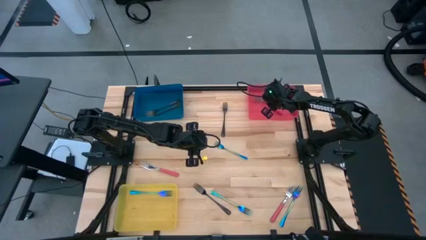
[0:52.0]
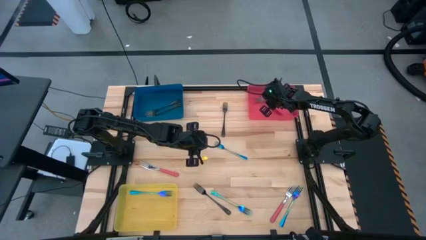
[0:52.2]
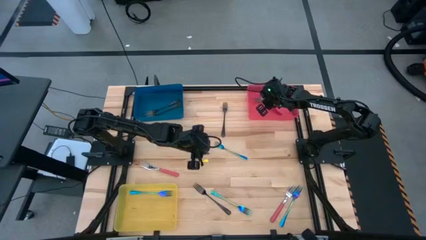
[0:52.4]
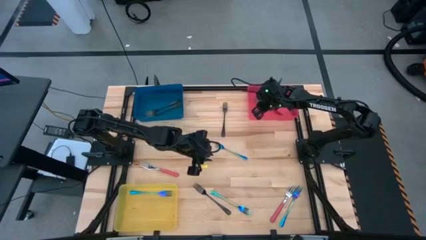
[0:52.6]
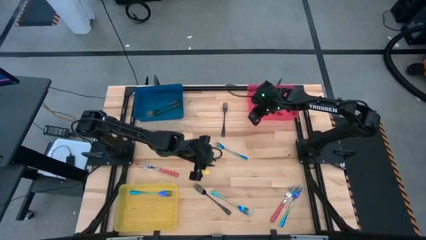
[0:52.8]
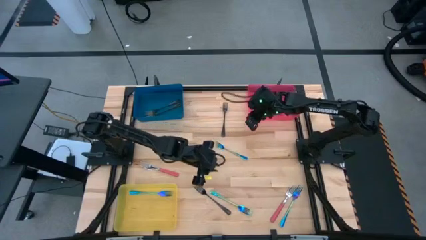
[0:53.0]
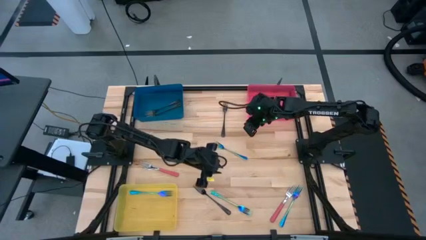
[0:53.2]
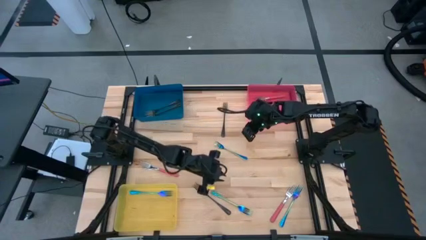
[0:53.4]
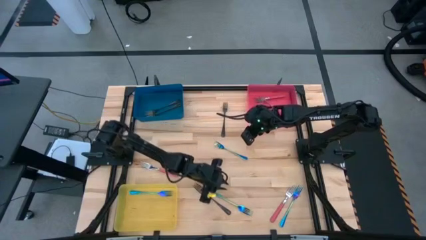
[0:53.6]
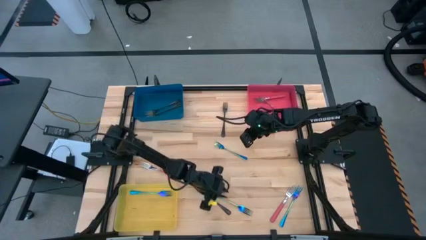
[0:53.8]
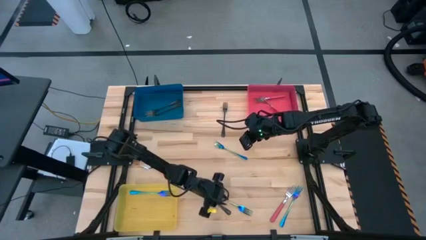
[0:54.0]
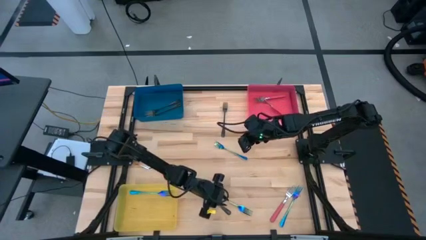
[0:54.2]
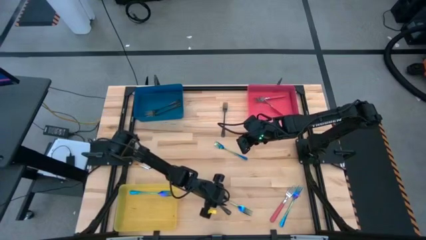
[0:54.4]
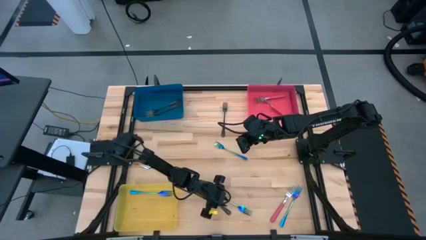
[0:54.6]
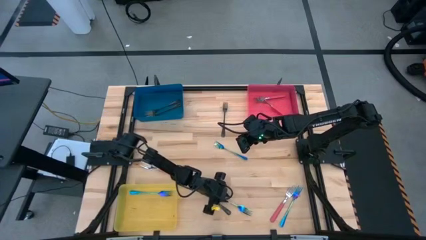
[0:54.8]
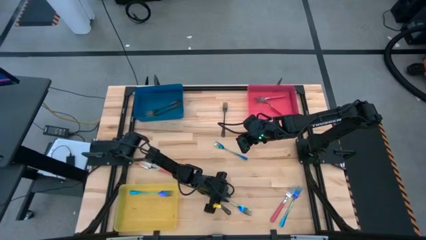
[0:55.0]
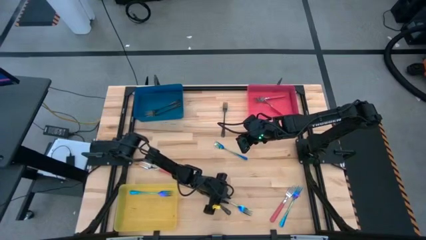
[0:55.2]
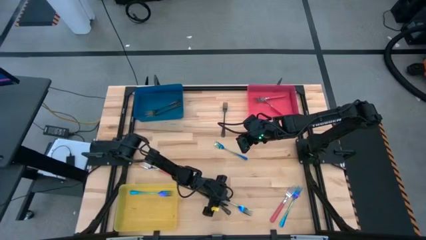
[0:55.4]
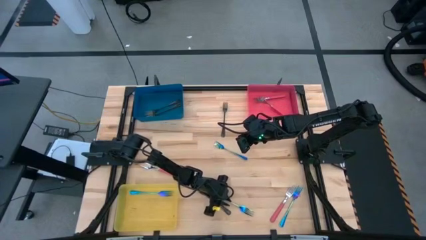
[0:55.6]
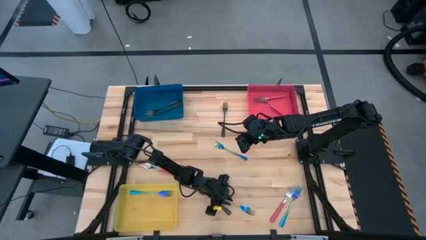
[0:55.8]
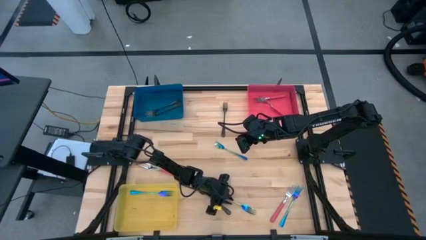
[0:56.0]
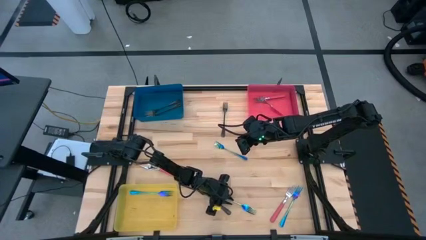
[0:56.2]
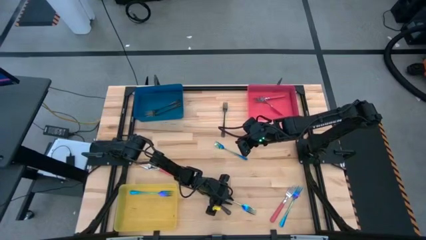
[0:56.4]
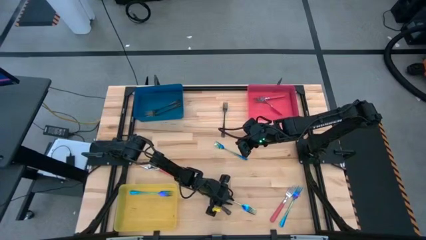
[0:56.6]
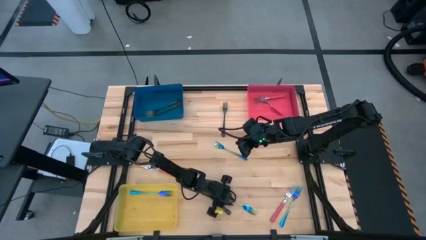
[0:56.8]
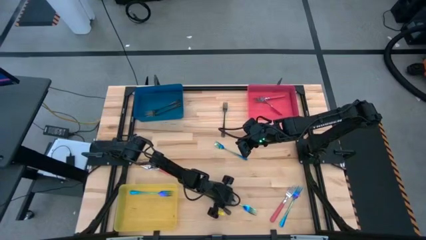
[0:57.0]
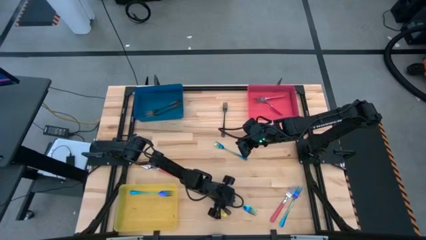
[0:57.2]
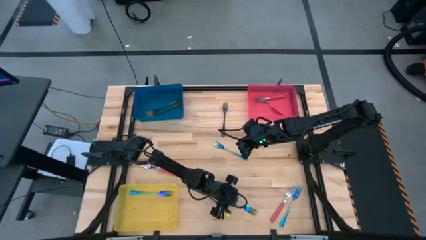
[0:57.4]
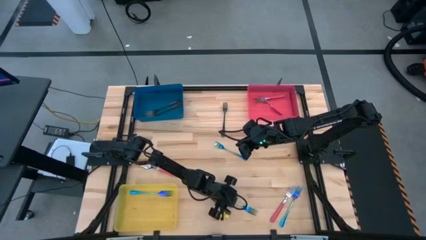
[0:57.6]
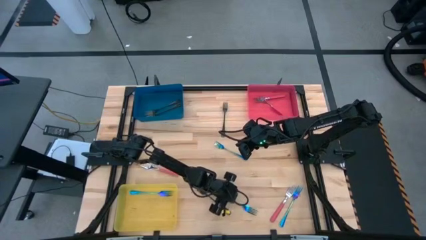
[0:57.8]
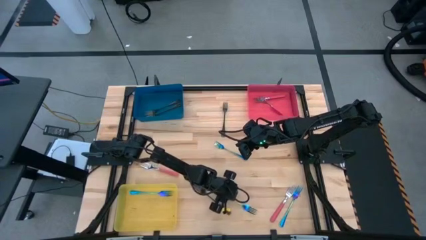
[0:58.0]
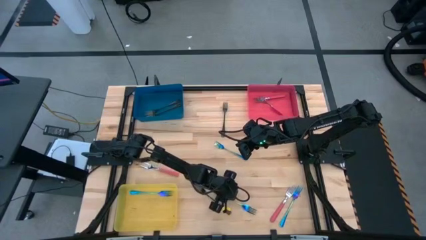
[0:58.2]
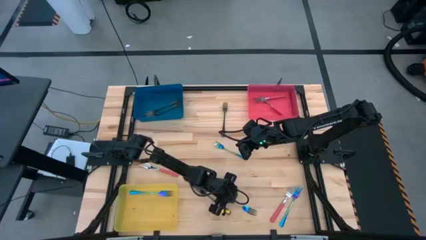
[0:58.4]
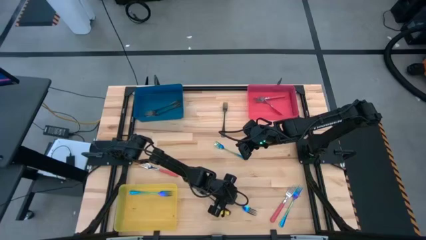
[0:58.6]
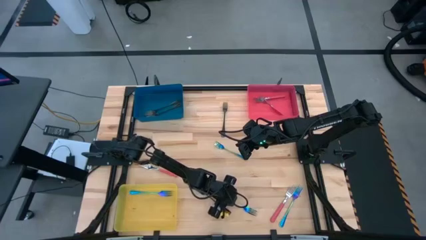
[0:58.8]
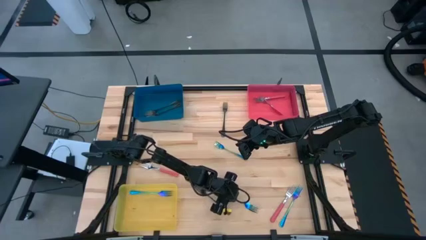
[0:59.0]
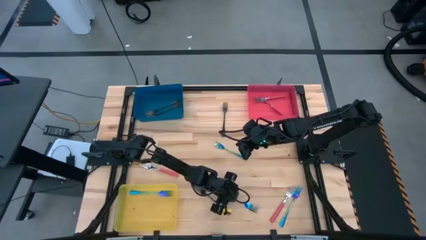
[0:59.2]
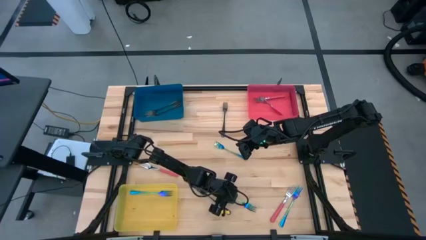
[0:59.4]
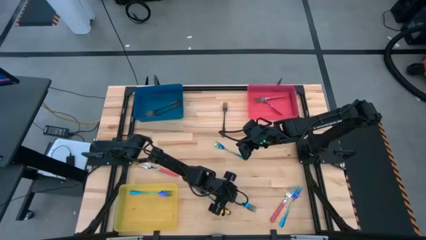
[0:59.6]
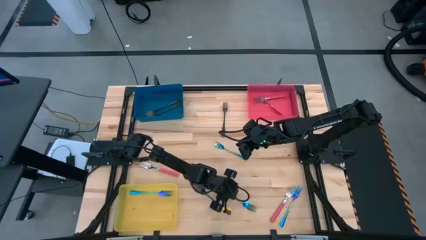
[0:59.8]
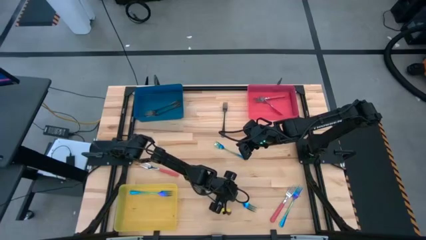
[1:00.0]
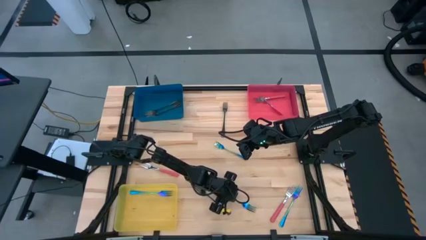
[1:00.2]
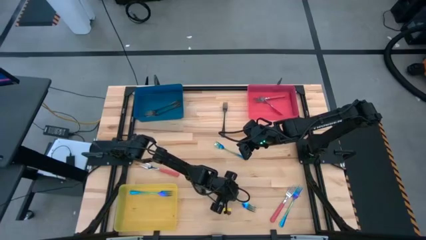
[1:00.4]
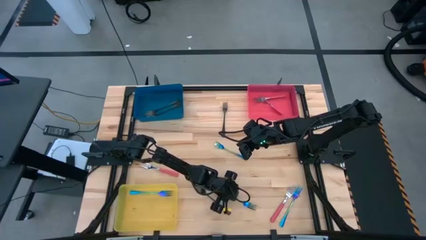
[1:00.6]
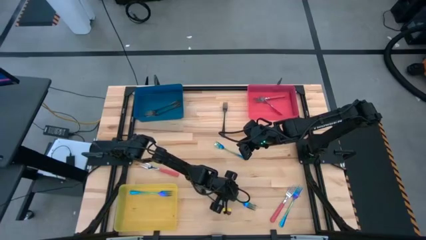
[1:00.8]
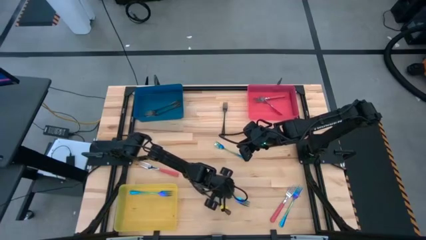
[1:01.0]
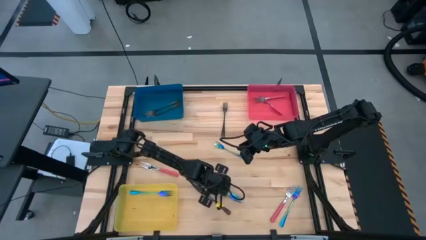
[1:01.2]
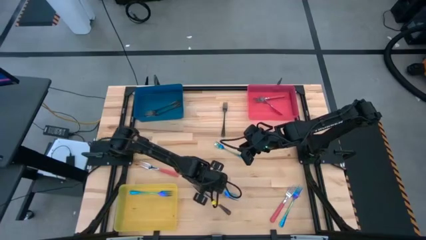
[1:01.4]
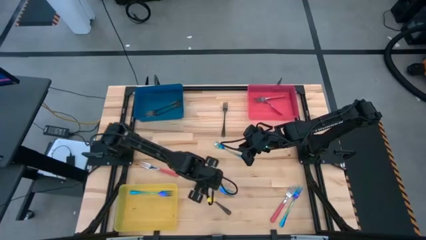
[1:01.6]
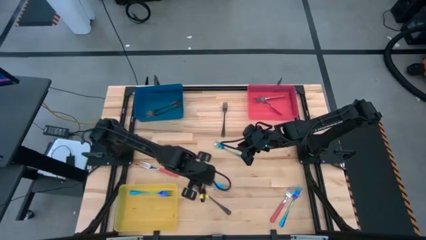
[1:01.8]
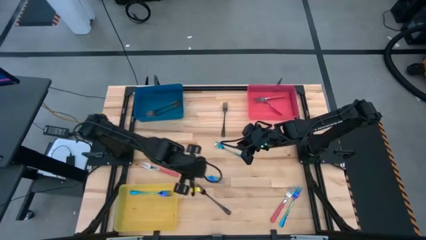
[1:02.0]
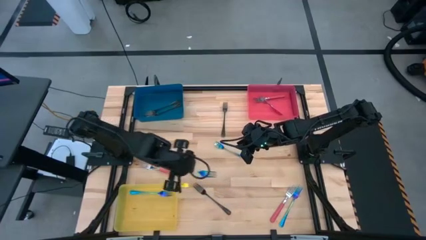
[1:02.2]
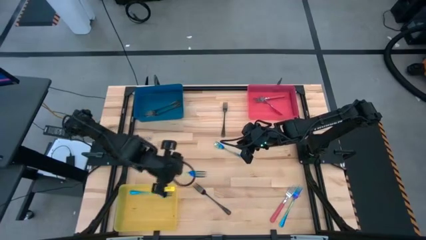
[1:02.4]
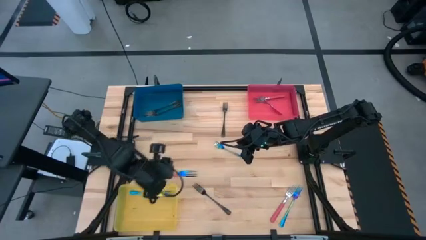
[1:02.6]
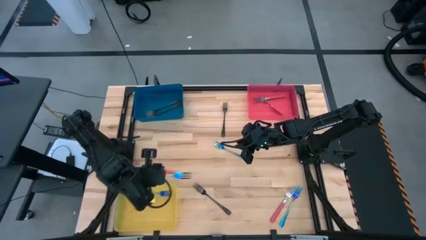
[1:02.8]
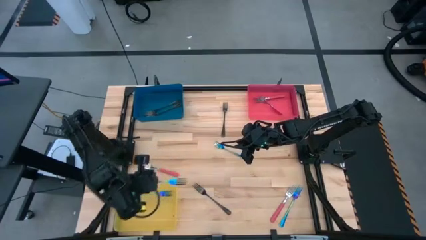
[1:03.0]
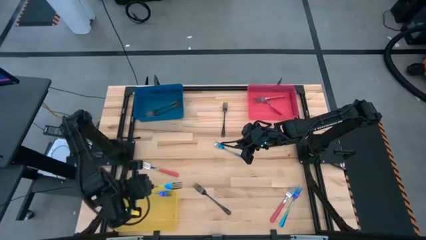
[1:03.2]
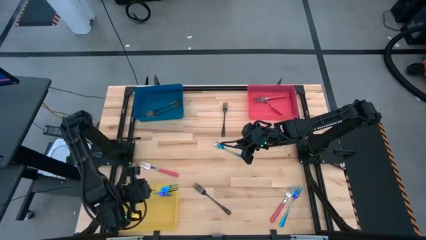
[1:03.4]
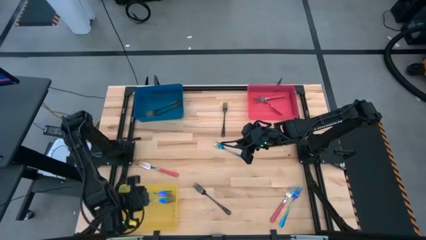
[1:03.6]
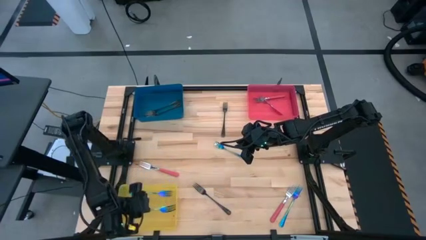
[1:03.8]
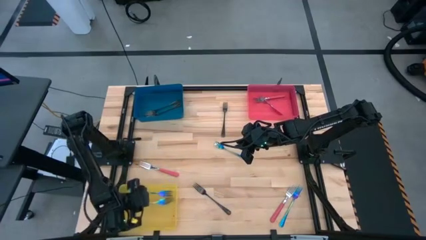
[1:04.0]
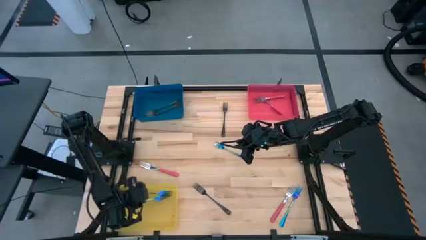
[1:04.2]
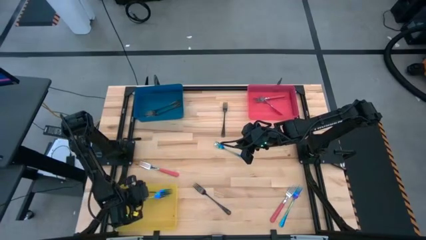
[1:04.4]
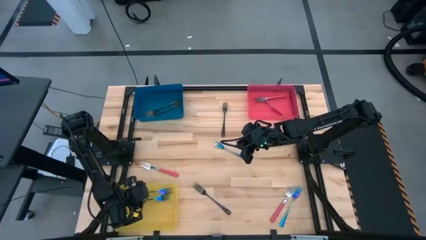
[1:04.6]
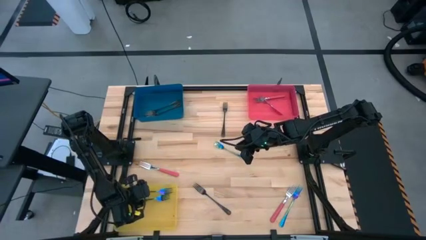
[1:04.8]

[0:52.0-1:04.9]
Task: Sort silverware by color (type)
Put the bottom left iridescent fork into the yellow bin

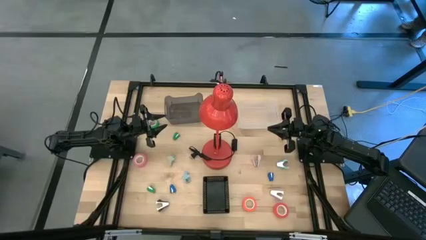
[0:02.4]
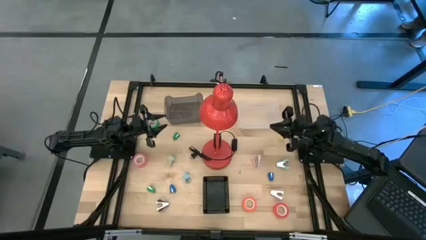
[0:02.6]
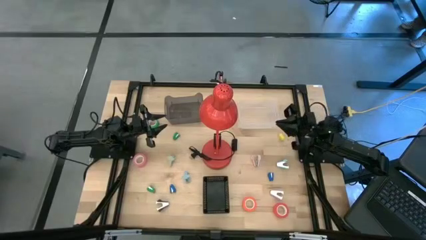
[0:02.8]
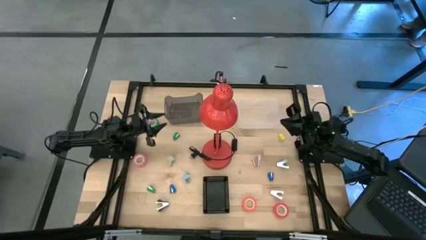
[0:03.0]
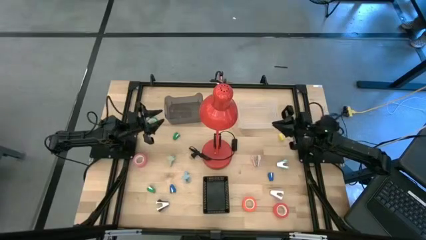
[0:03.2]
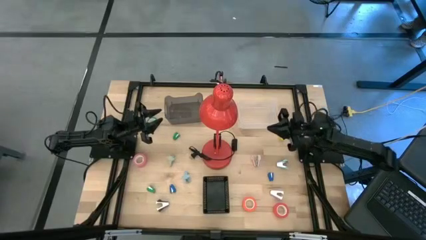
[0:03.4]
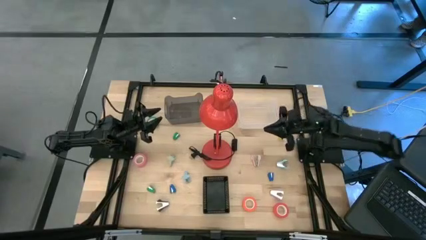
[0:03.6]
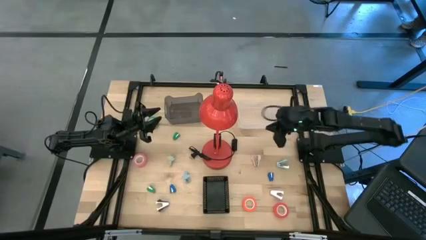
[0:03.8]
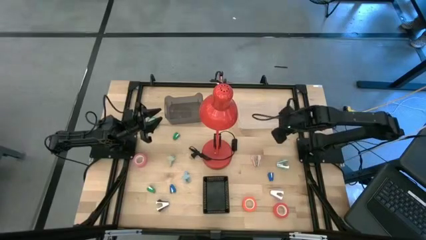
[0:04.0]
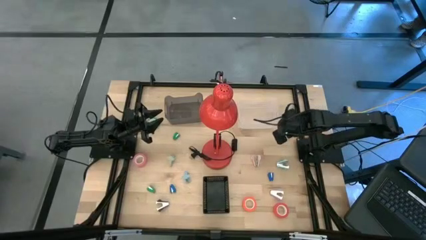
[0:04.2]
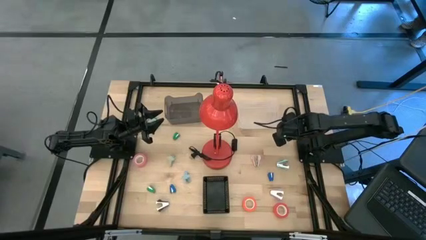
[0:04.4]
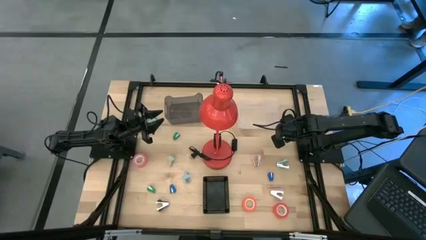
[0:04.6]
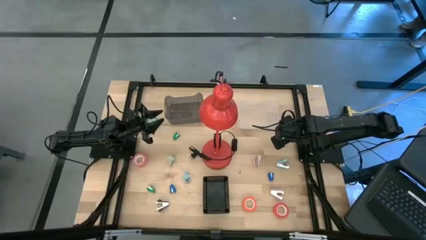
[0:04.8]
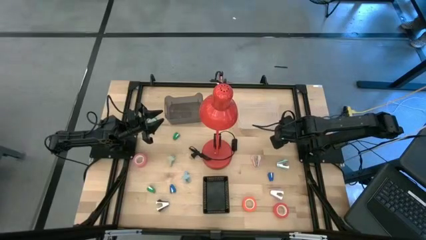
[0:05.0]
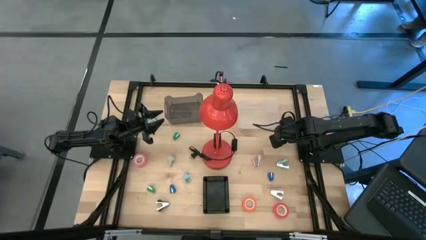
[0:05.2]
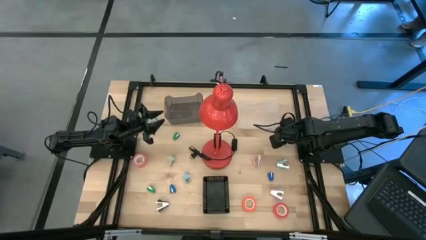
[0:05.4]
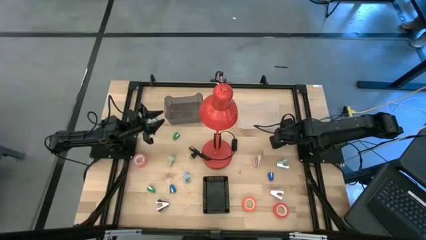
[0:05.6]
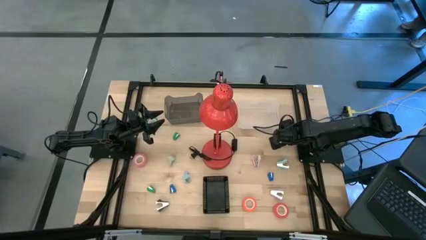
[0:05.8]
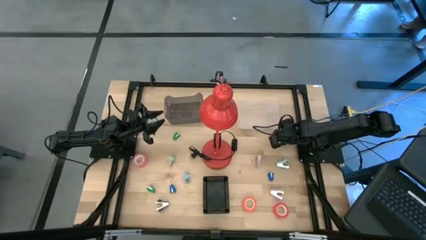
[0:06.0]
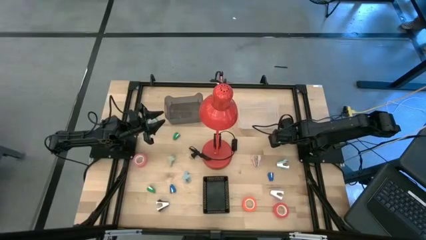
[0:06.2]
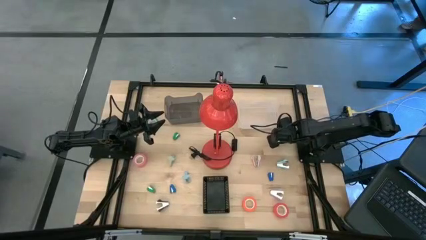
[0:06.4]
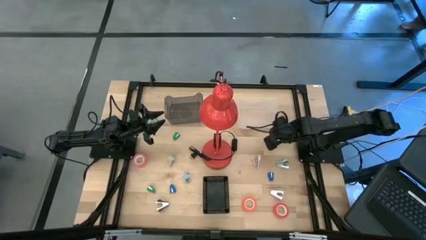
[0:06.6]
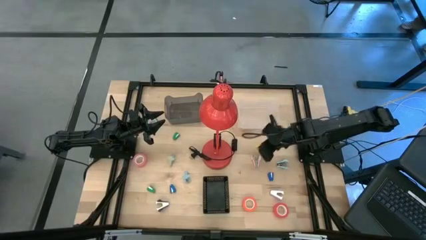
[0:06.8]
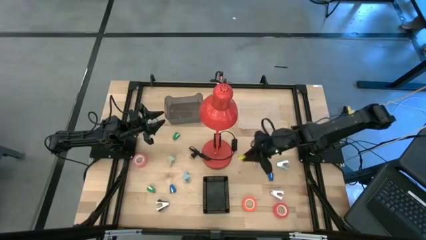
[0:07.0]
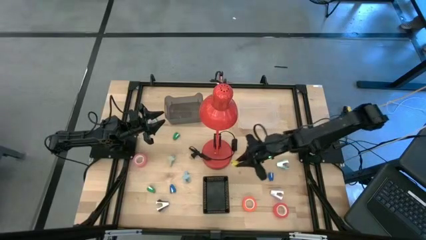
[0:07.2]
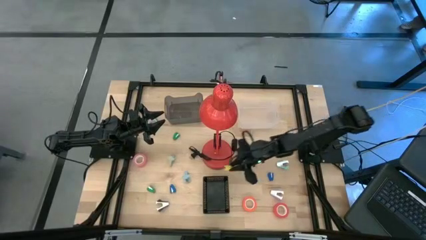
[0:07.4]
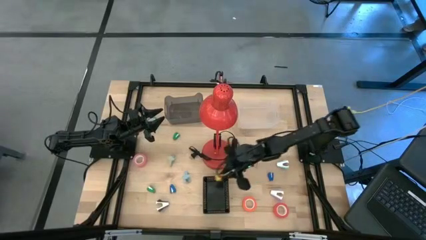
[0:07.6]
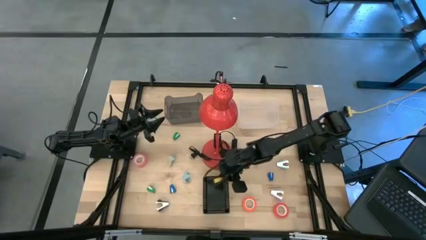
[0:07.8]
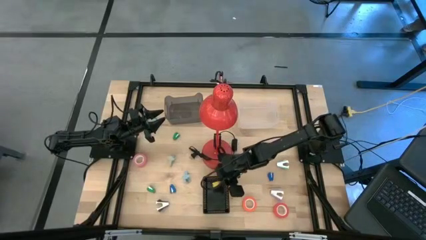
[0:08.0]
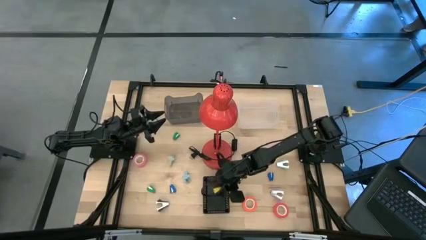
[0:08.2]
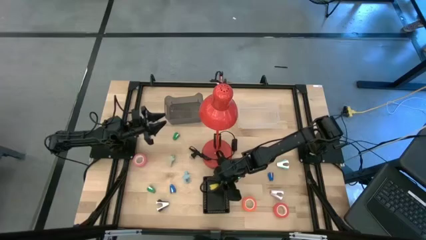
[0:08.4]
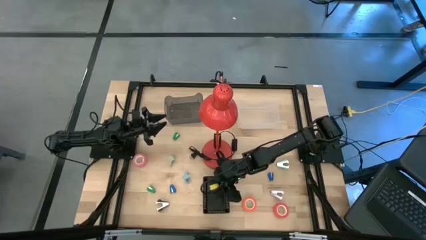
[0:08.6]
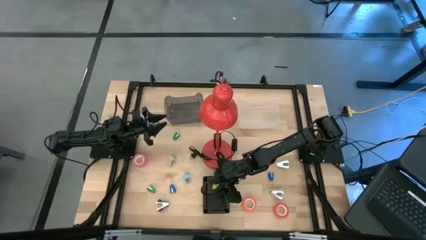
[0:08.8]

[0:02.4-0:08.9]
Task: Pick and place Stapler, Stapler remover, tape
Put the yellow stapler into the black bin
